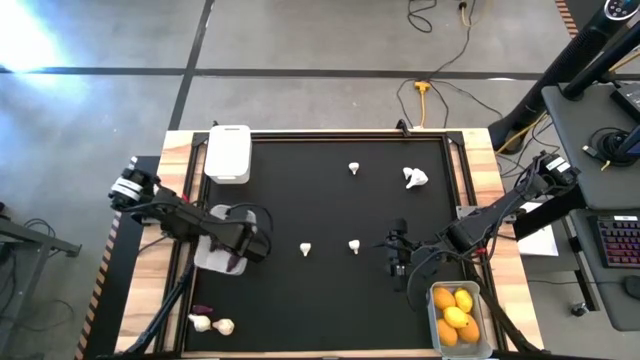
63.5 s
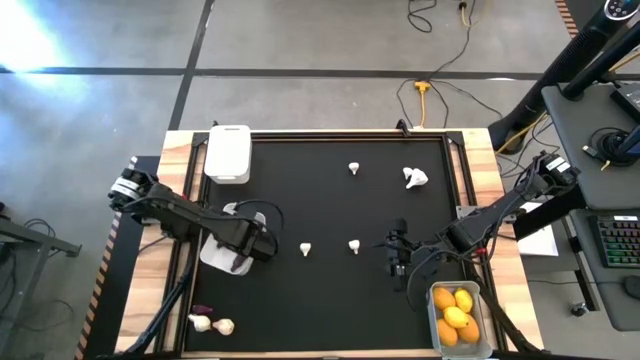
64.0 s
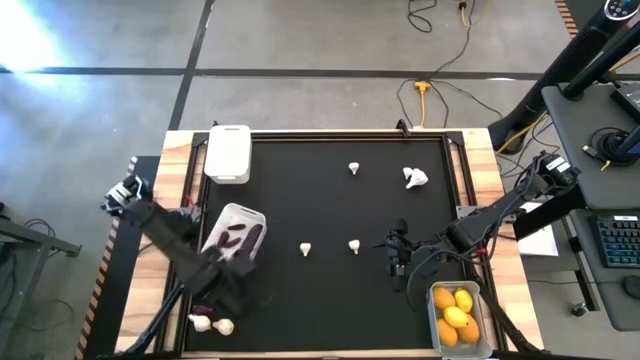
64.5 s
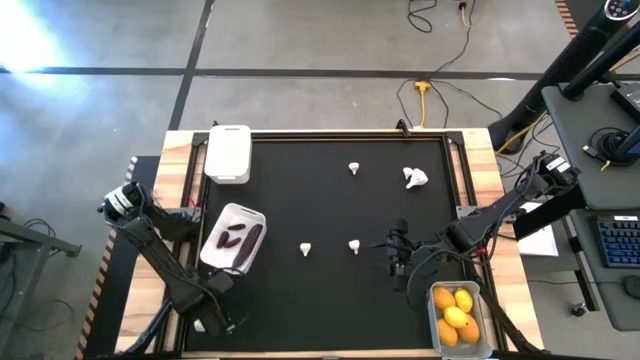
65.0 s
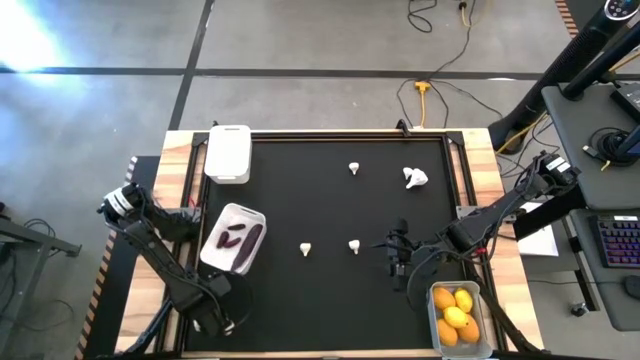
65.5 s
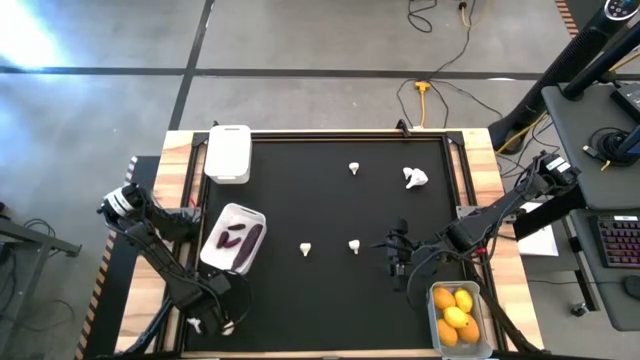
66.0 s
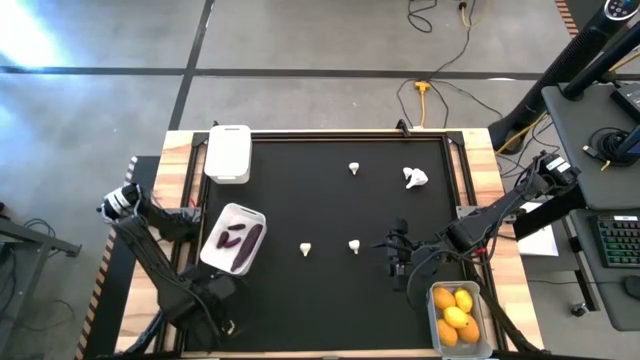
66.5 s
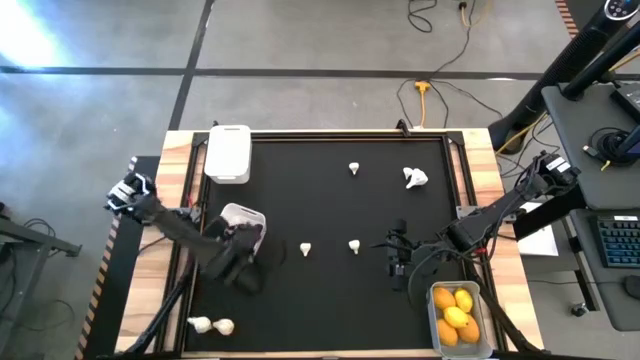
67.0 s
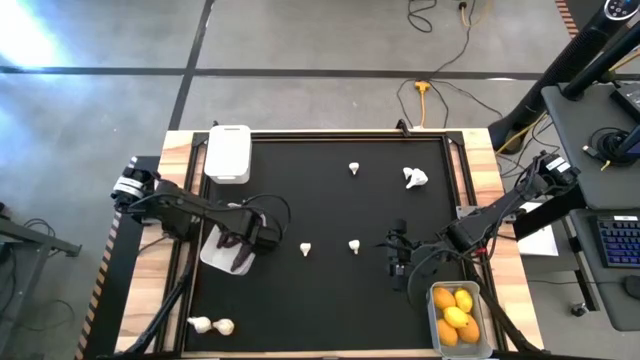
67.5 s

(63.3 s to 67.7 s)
Task: Sort produce into baskets
Put the eggplant into the bottom white bin

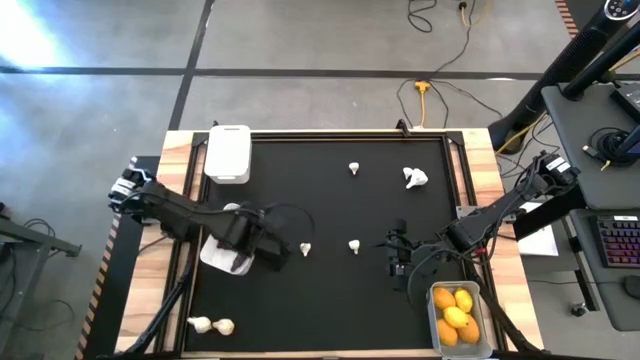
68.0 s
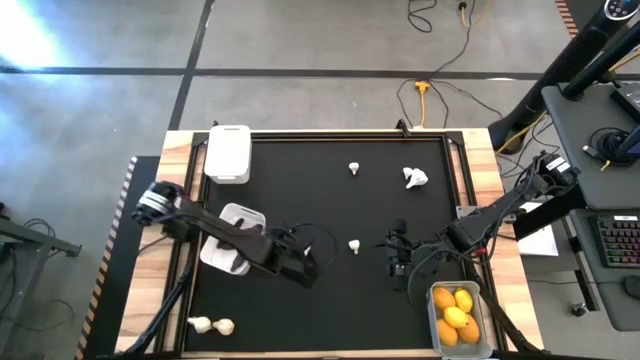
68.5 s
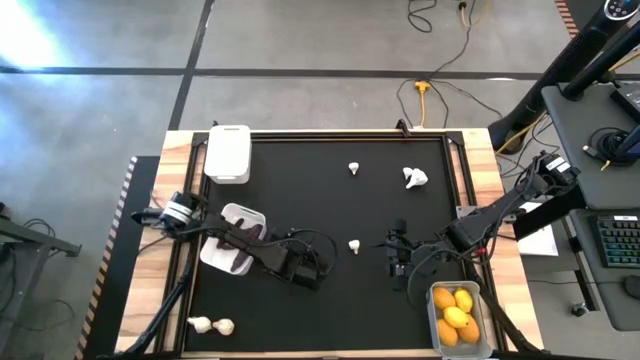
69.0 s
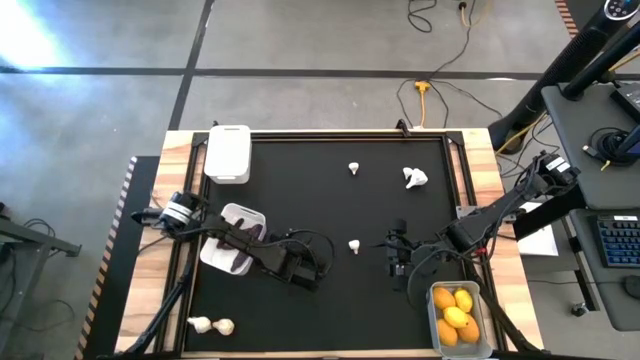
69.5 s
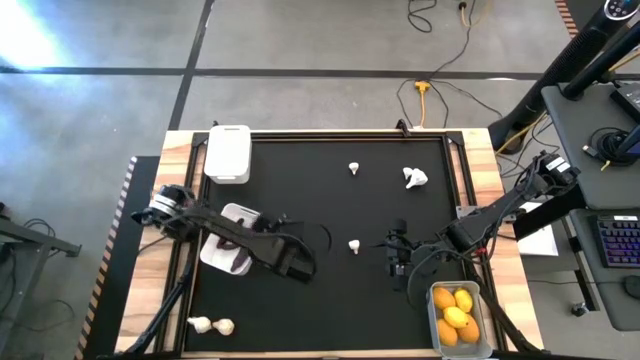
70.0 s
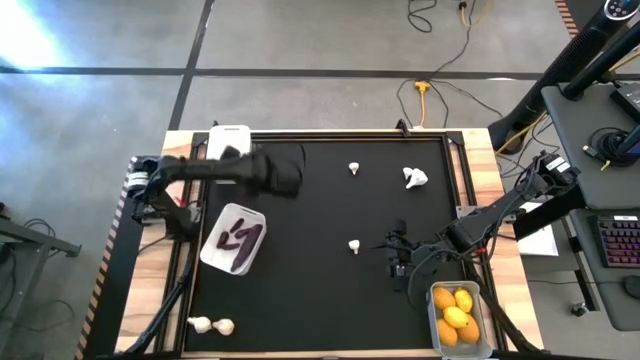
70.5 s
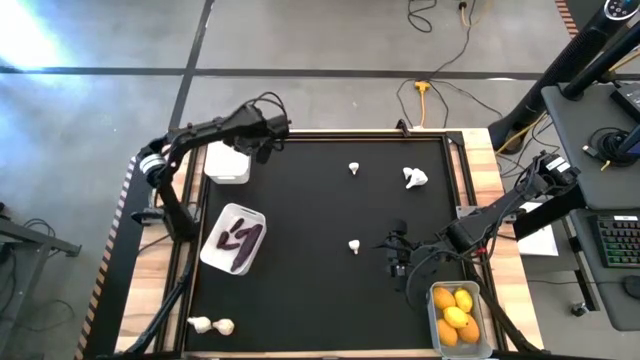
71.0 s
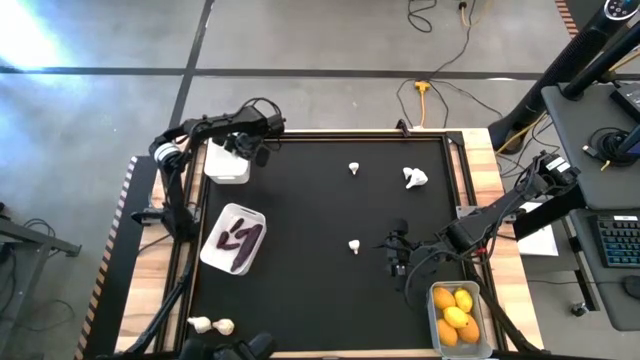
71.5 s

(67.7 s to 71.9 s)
Put the eggplant into the bottom white bin

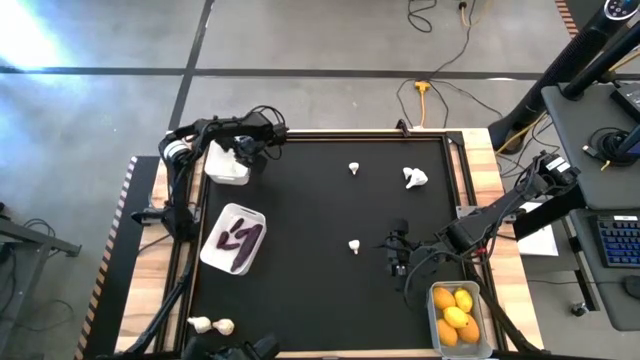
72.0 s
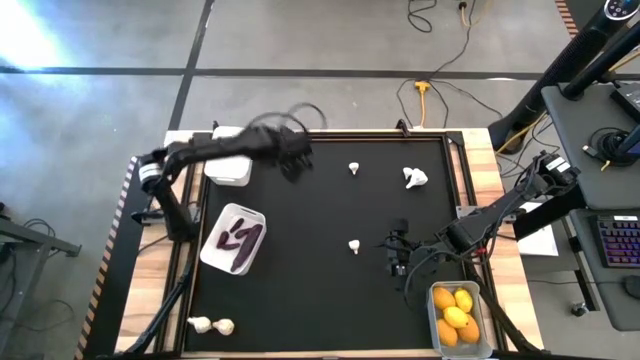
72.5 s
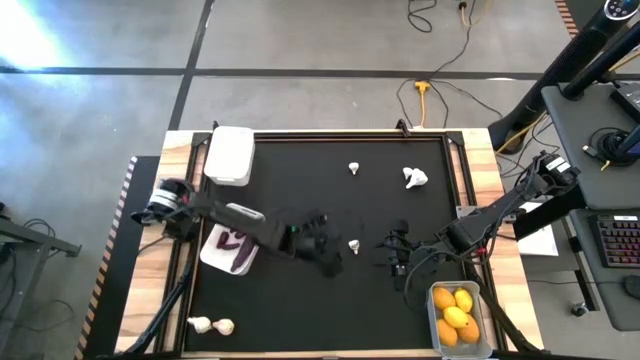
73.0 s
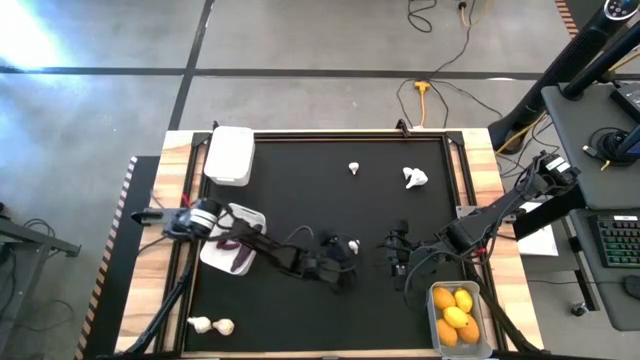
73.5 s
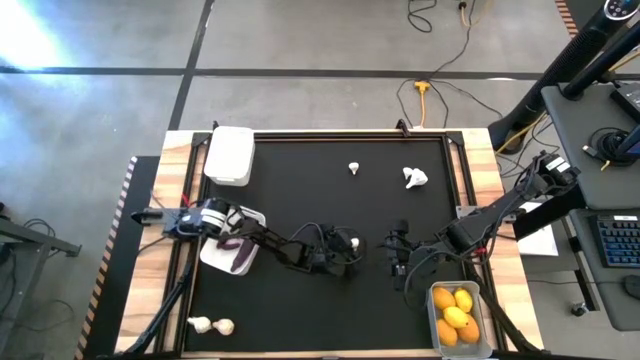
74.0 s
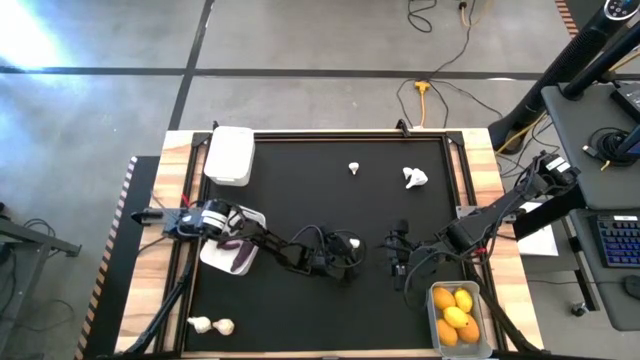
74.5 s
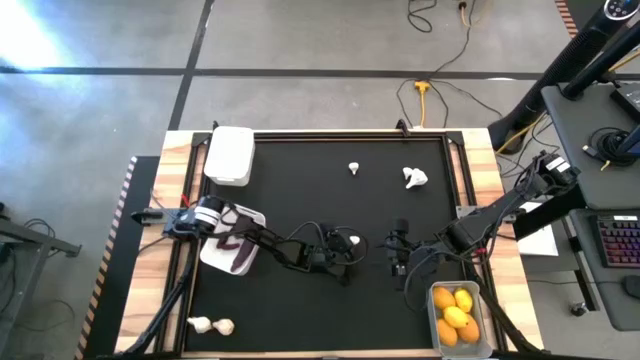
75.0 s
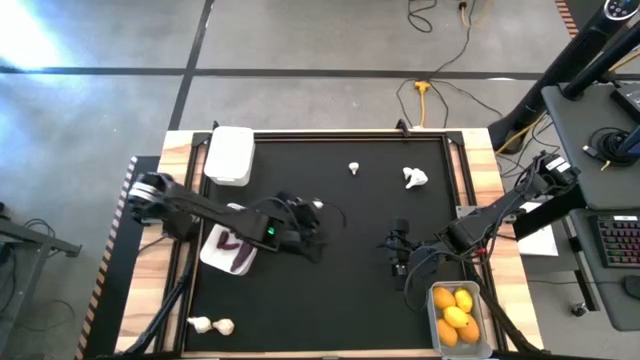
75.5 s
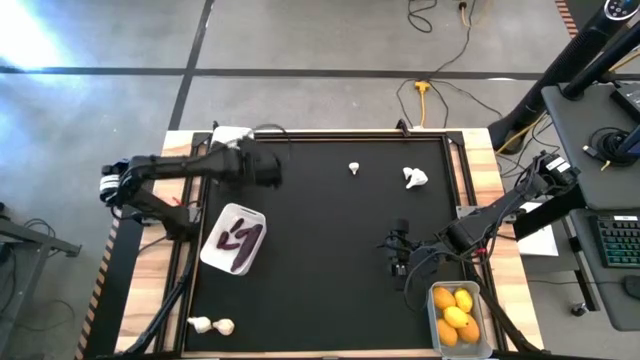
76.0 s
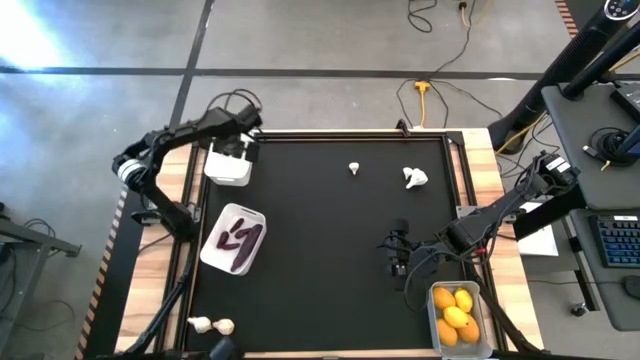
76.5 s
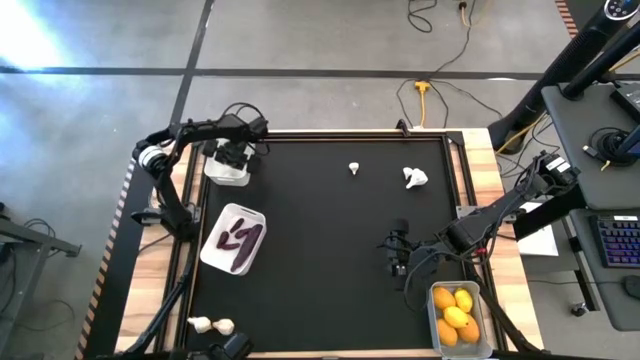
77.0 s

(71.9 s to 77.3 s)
Put the garlic into the top white bin

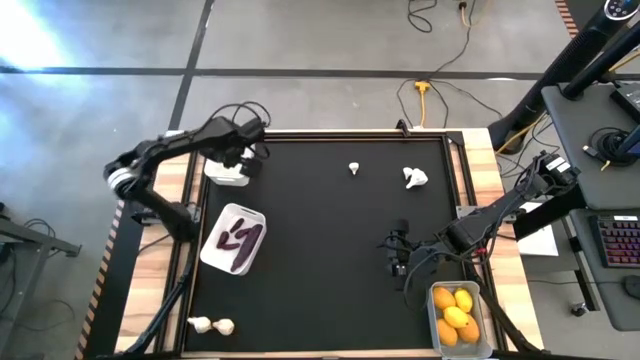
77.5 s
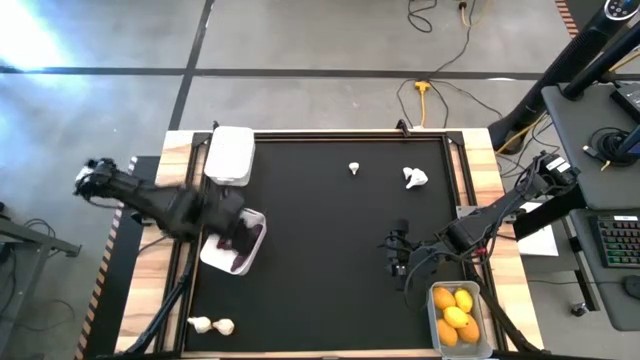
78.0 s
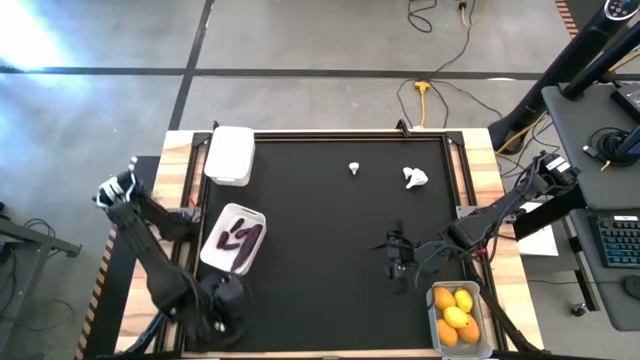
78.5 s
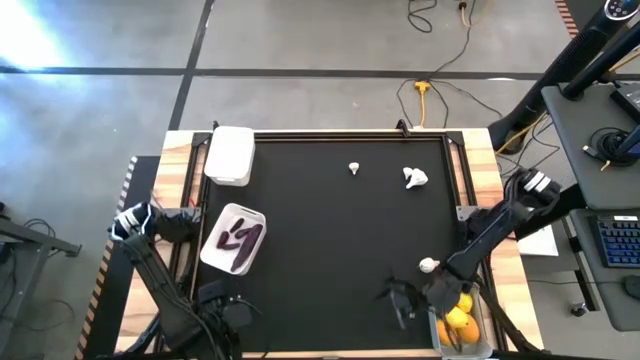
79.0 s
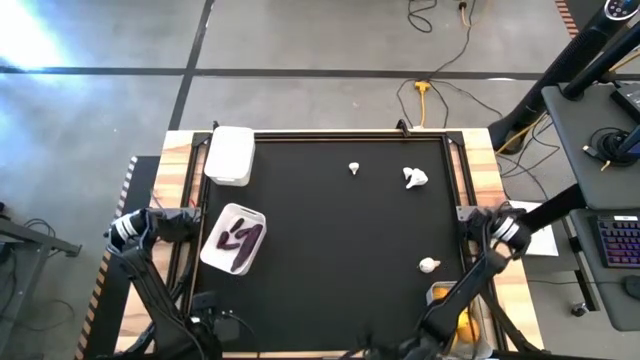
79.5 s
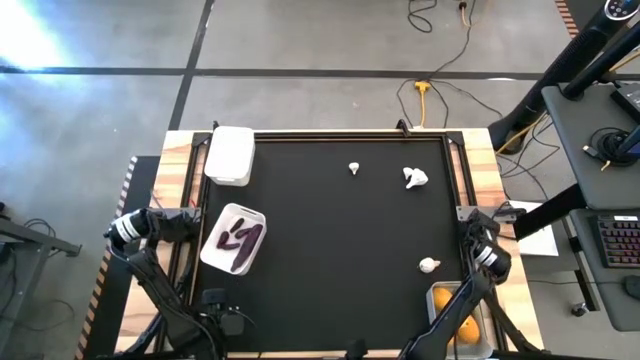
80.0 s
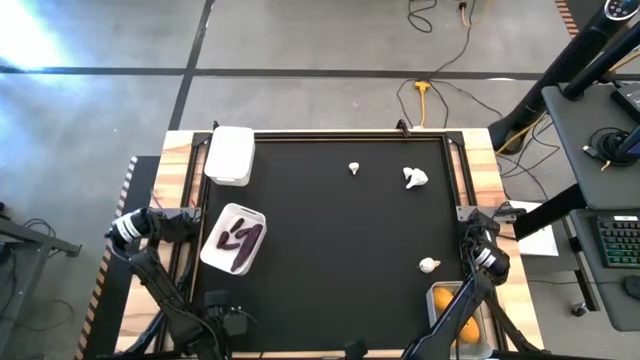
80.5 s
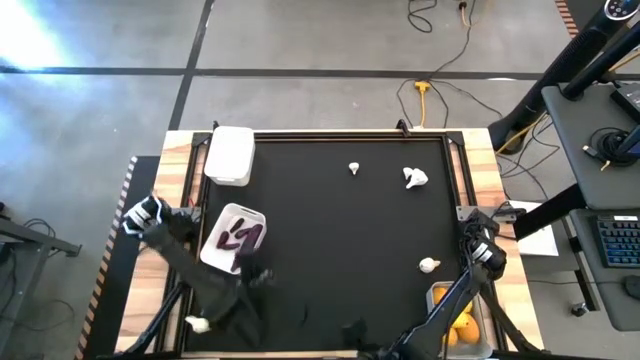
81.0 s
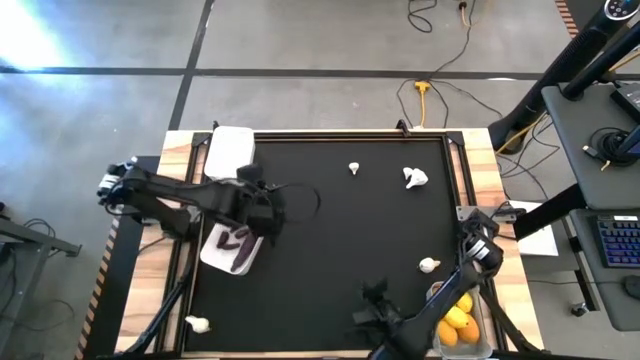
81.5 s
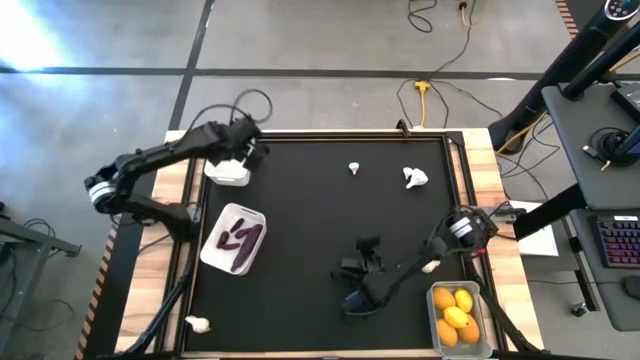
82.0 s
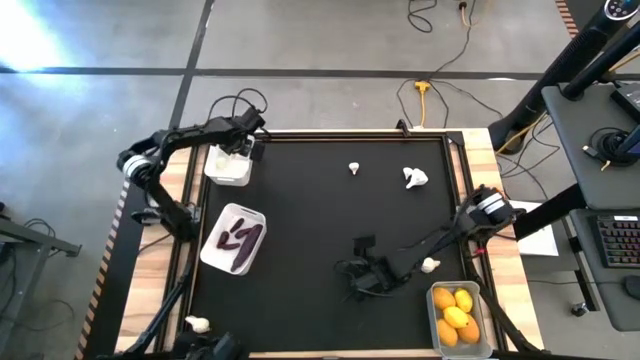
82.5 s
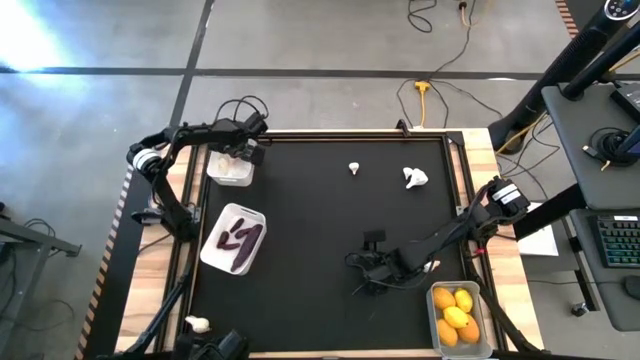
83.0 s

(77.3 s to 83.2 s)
Put the garlic into the top white bin

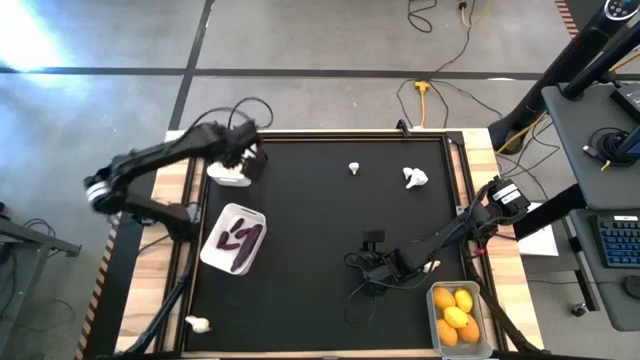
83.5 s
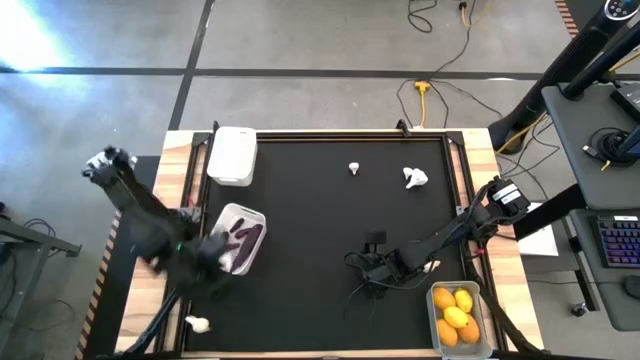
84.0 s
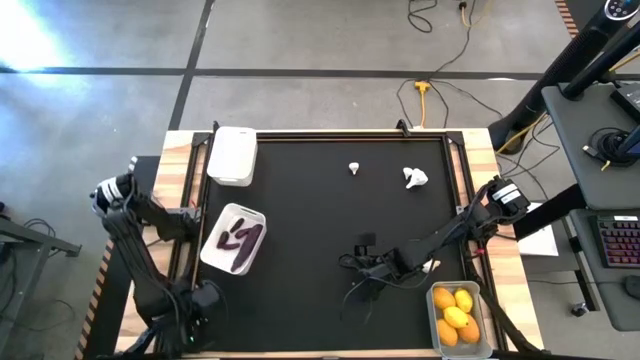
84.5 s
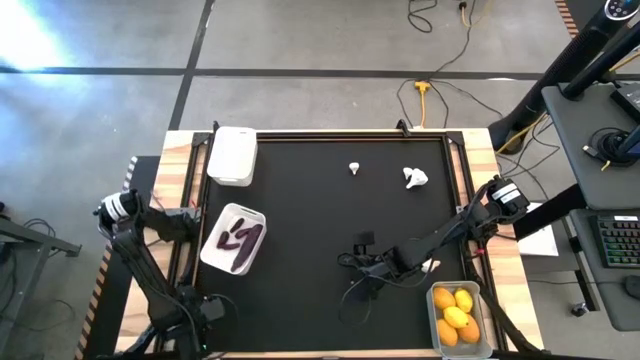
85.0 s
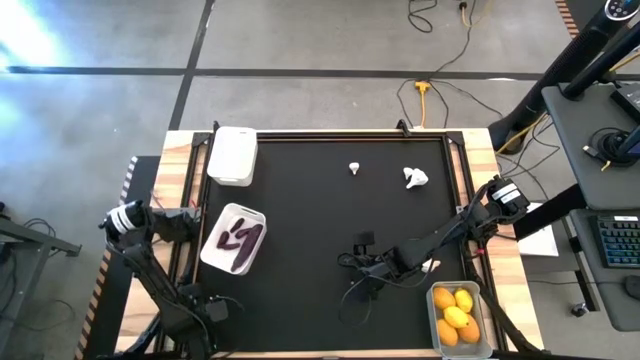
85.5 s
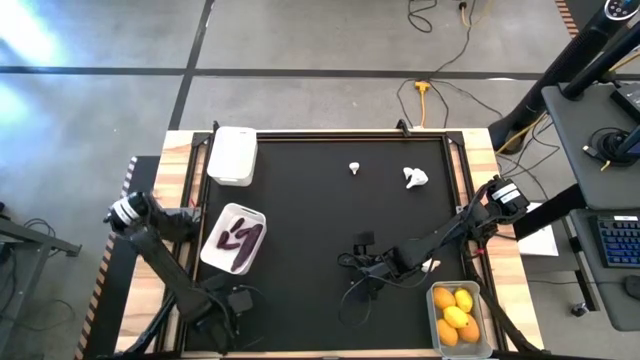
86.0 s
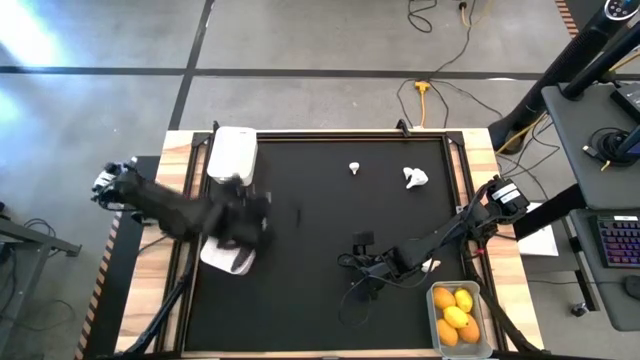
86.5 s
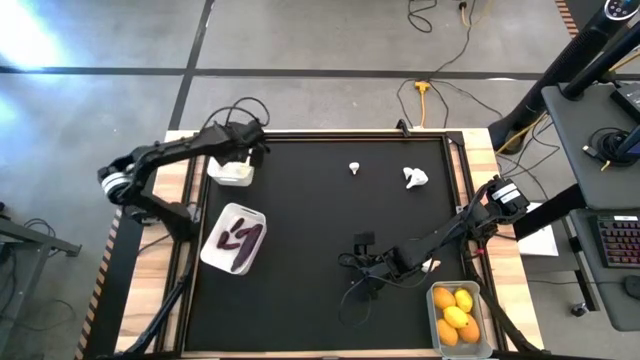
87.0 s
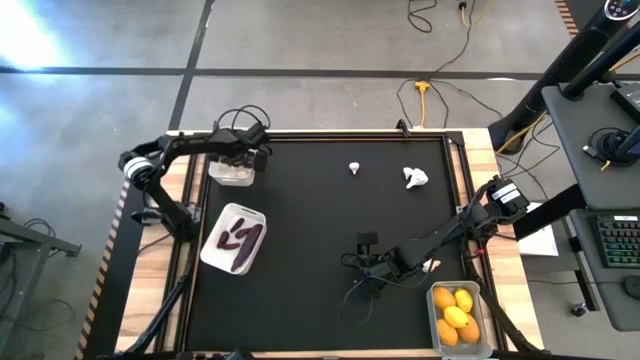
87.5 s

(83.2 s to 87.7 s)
Put the garlic into the top white bin
